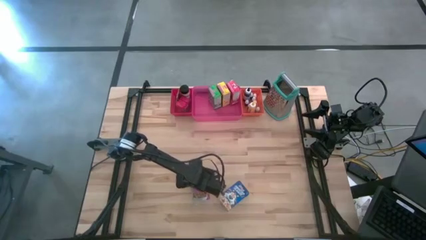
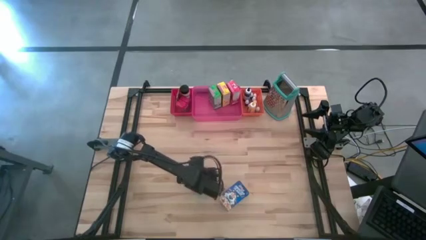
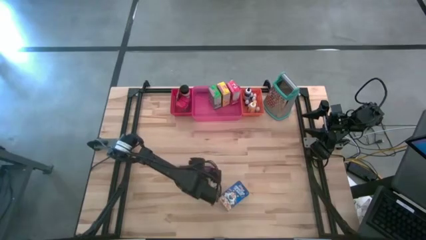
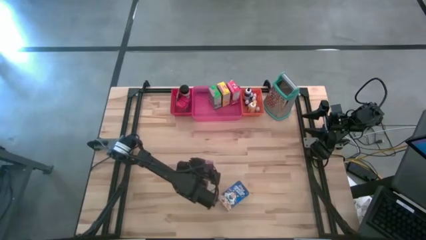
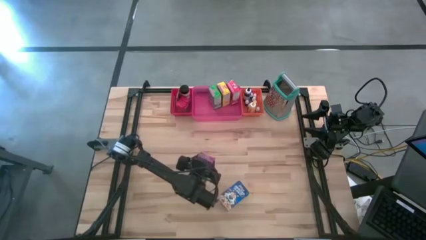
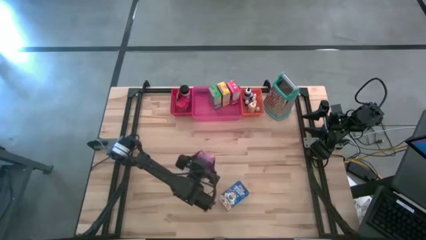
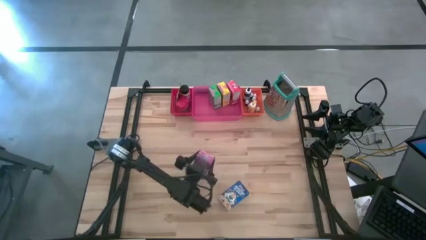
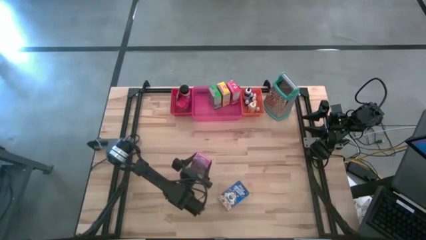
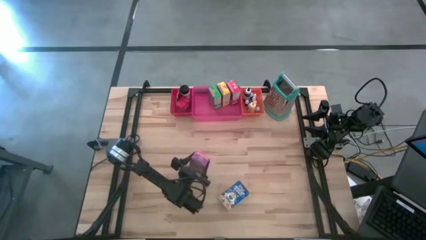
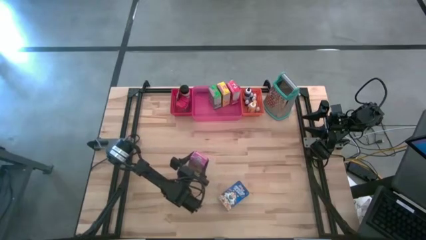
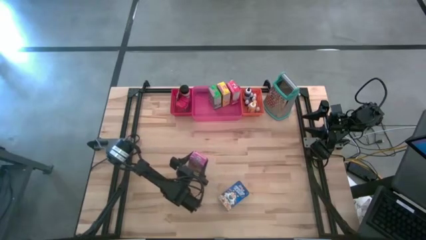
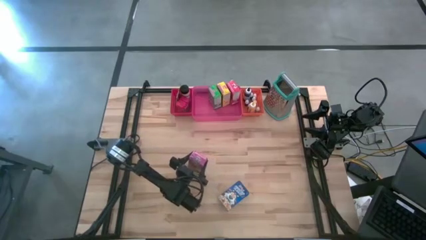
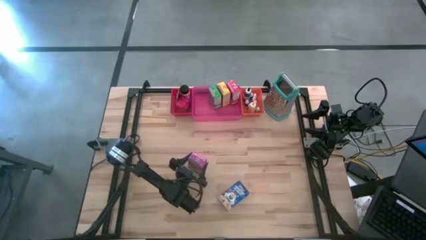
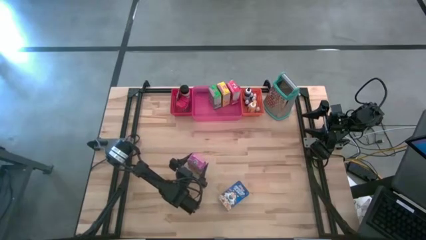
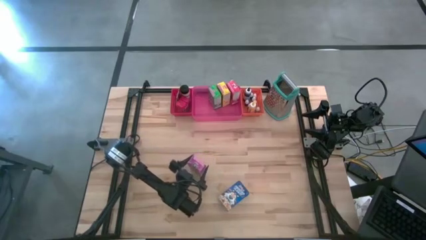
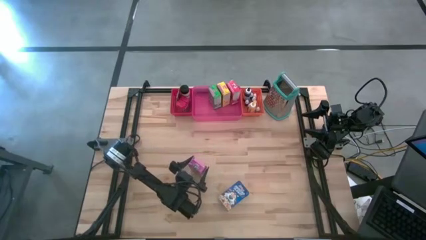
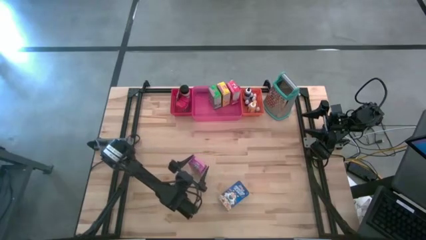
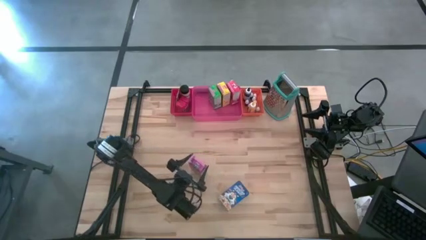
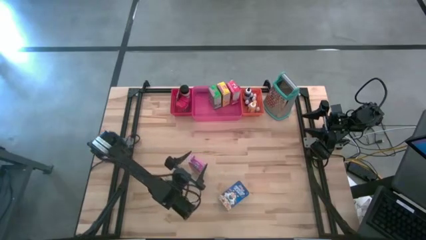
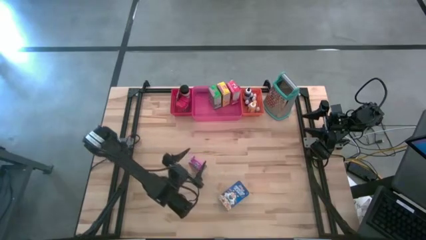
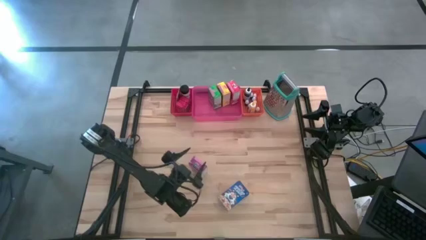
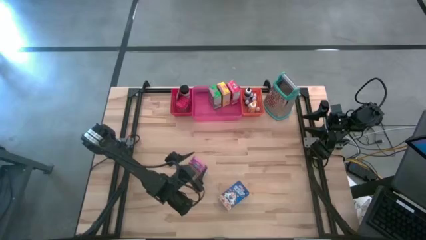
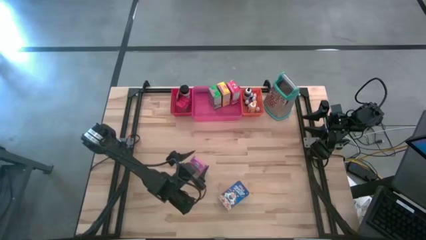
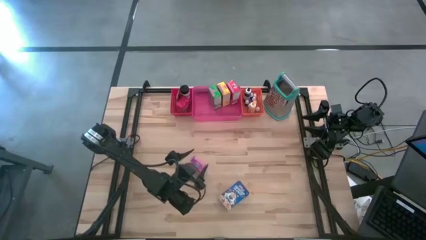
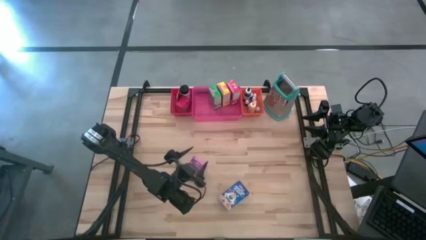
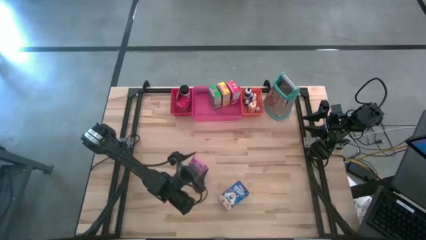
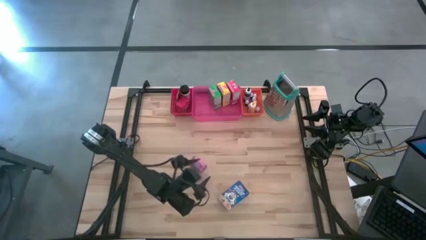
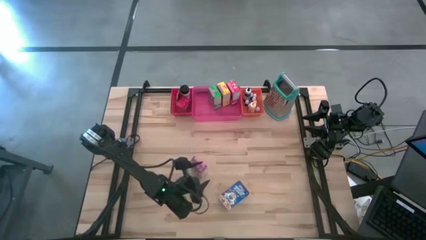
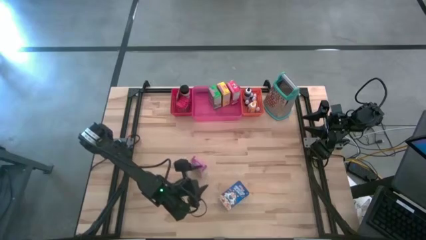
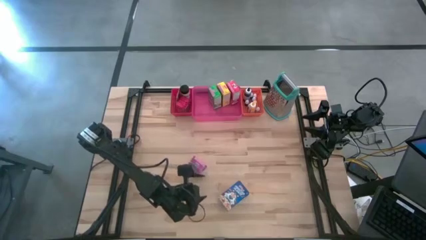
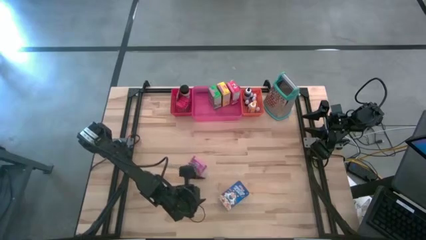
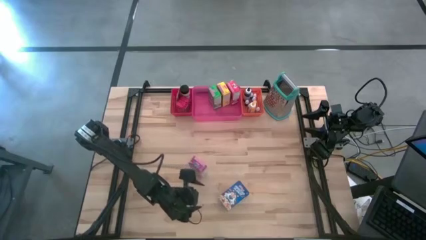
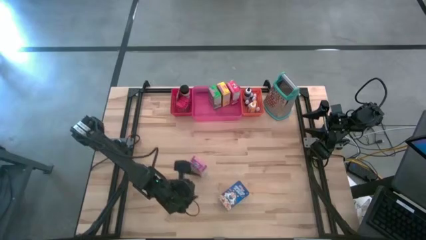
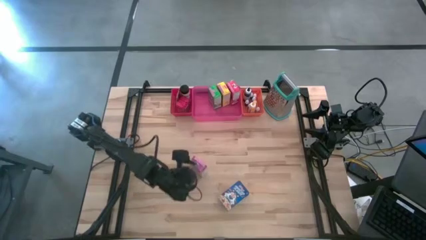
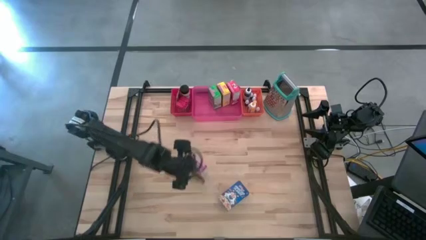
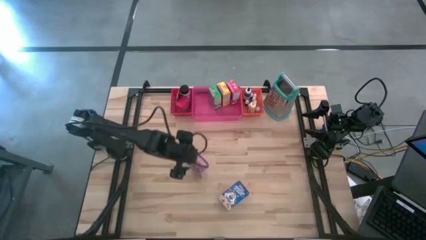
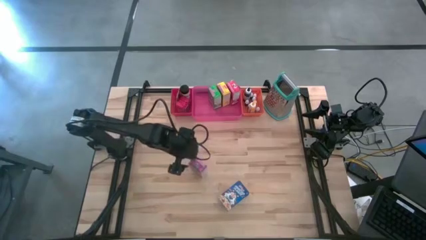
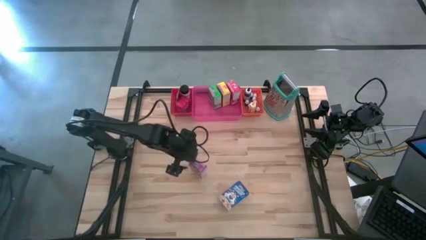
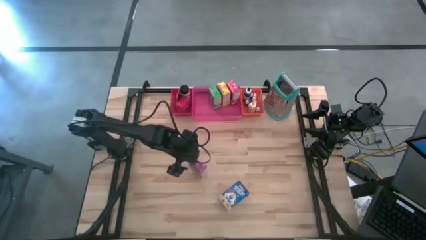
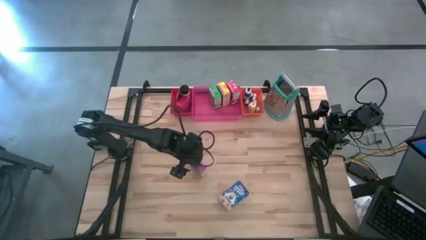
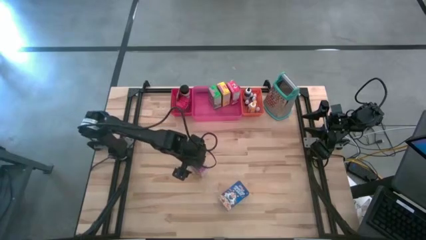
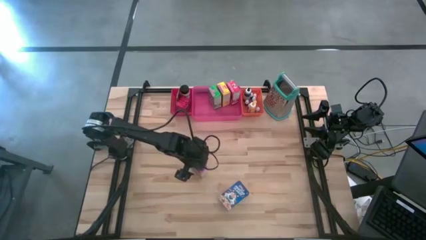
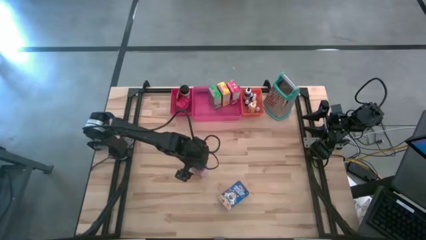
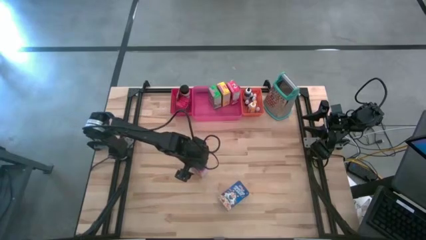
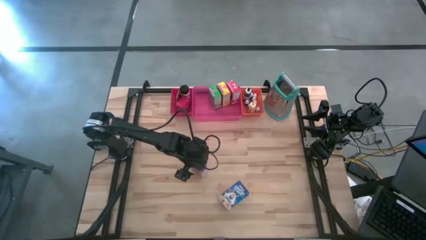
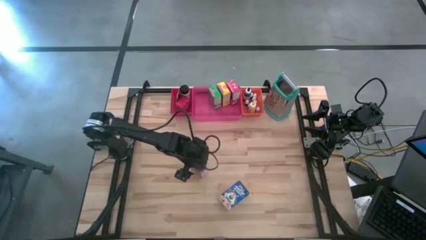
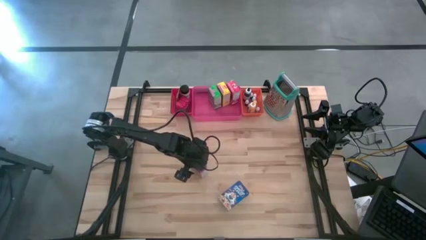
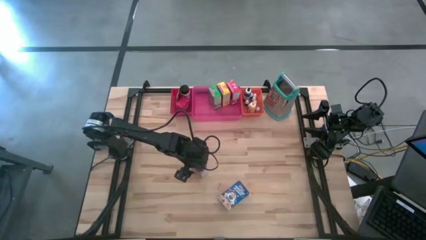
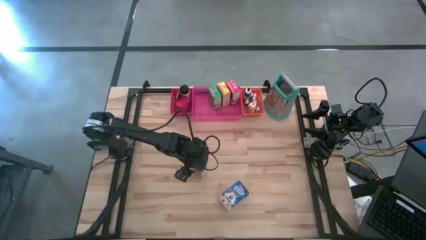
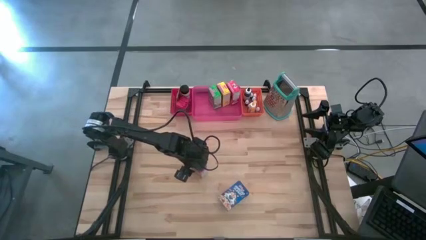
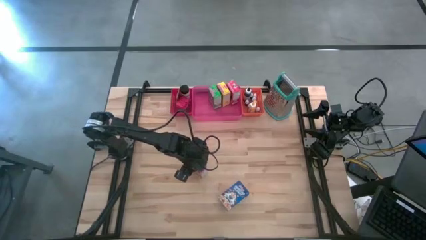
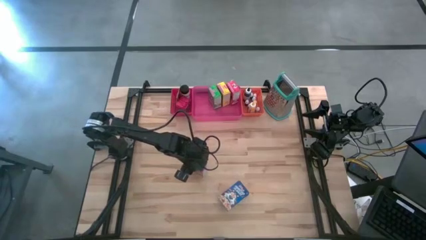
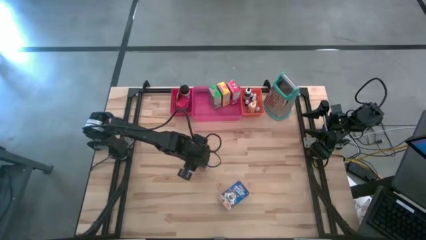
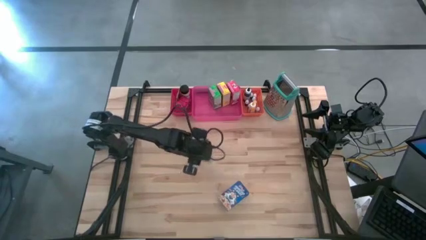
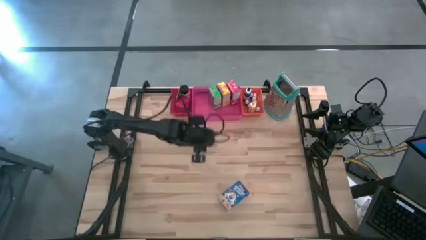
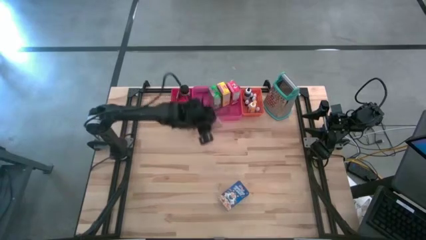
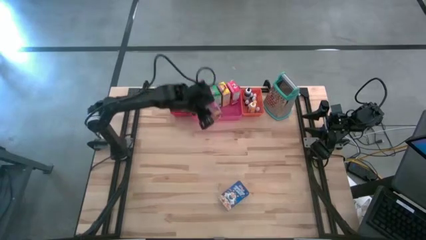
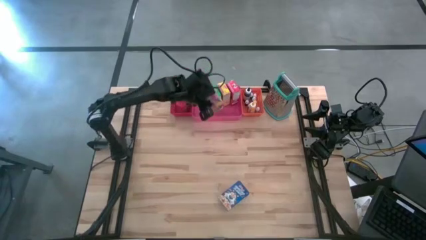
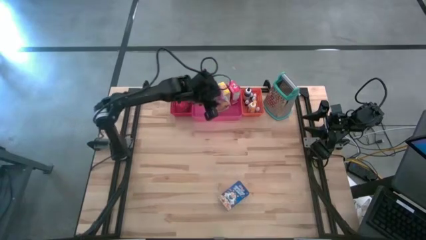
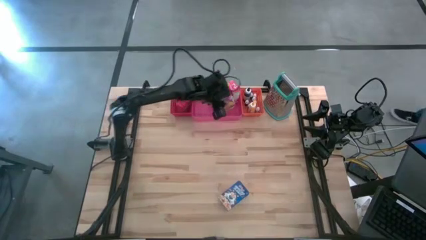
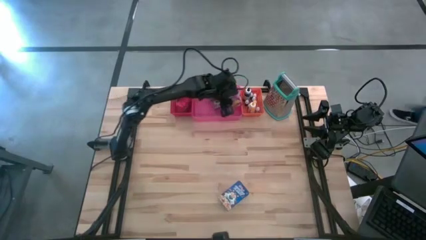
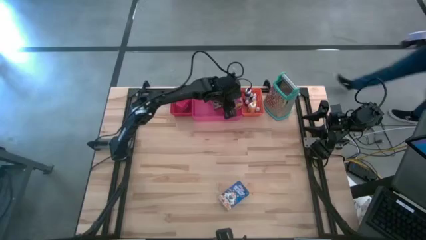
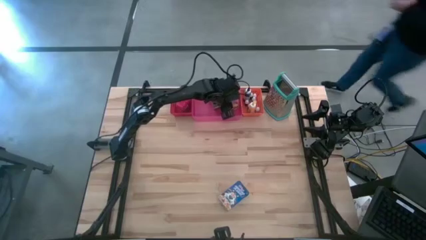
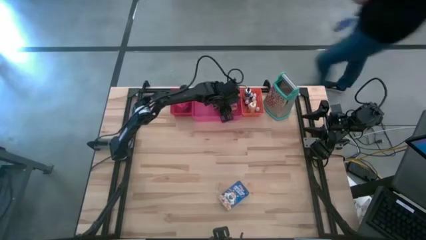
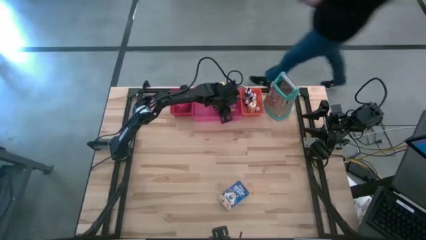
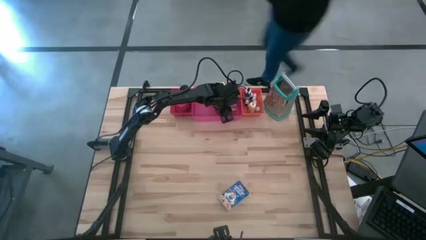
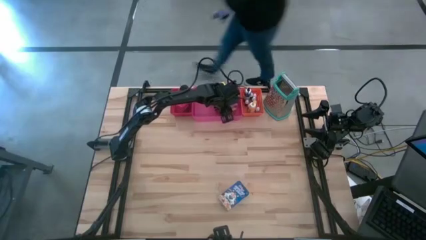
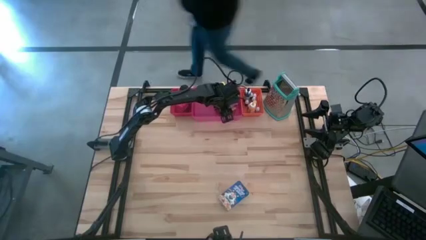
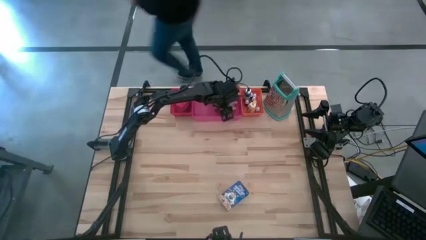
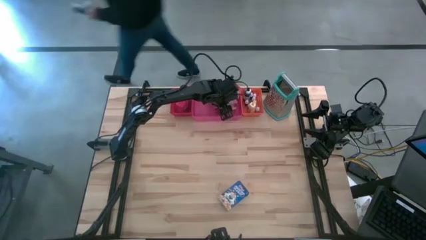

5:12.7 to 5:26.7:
Task: Pick & Place Kitchen Items
Put the purple cereal box into the pink bin
